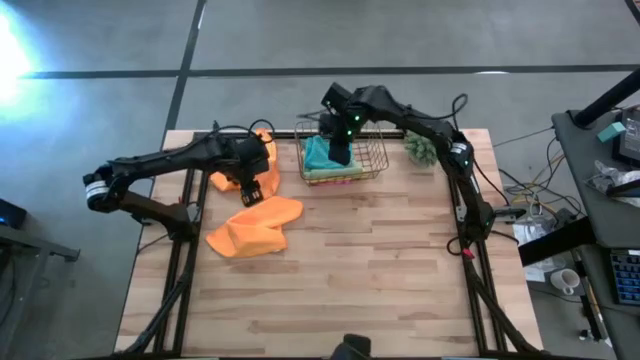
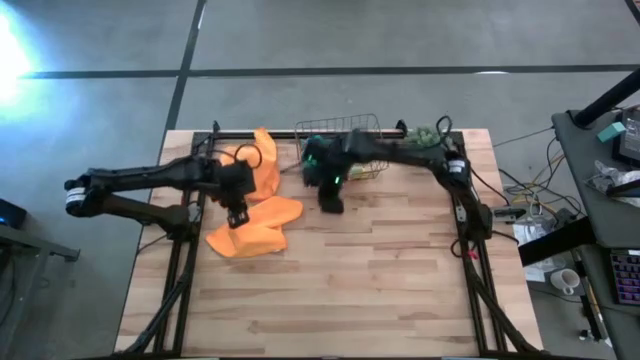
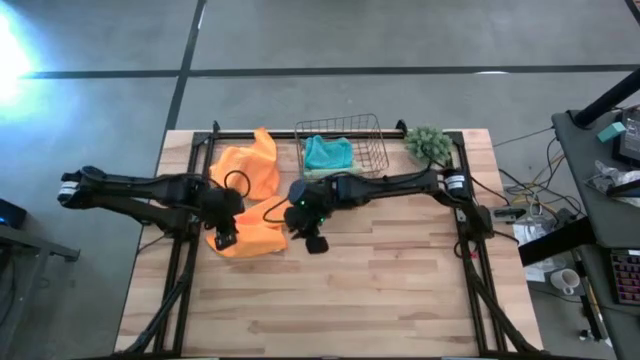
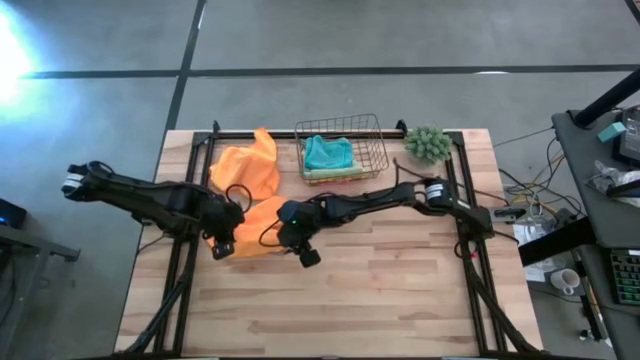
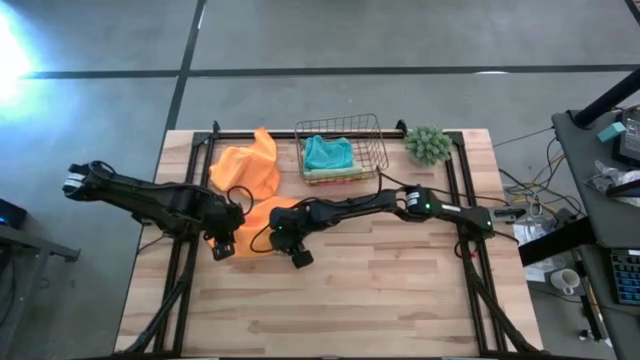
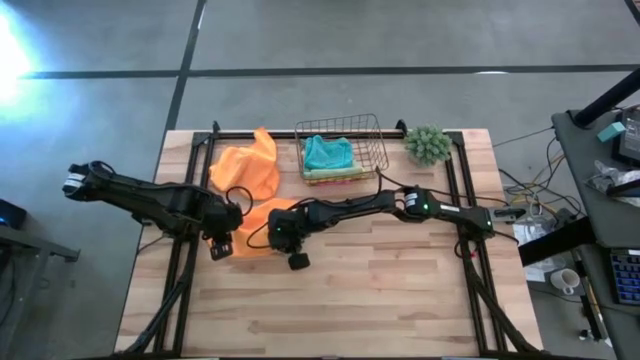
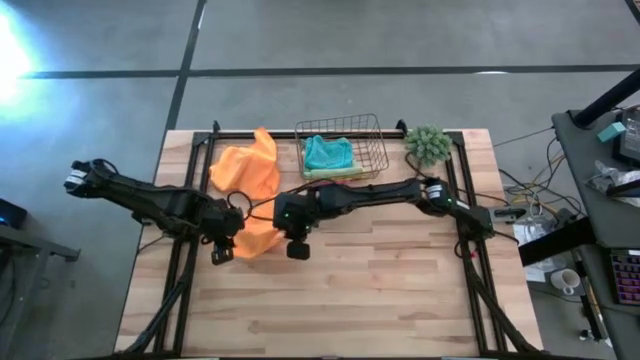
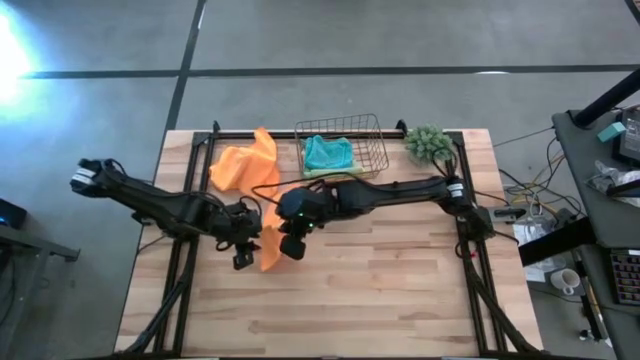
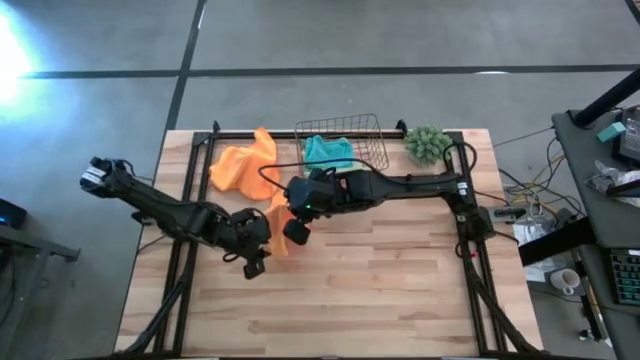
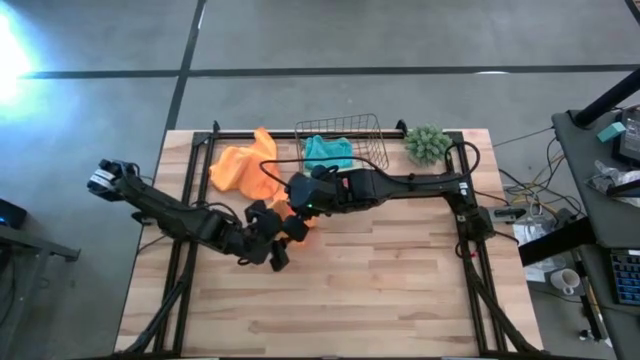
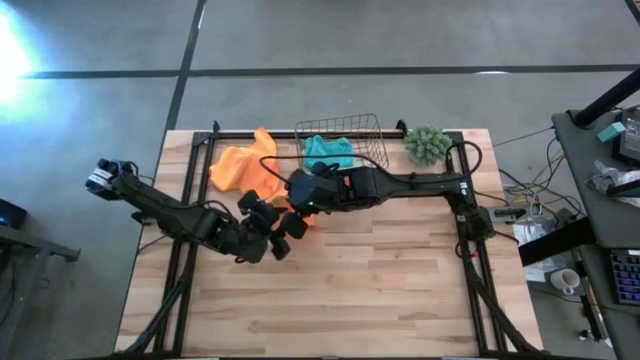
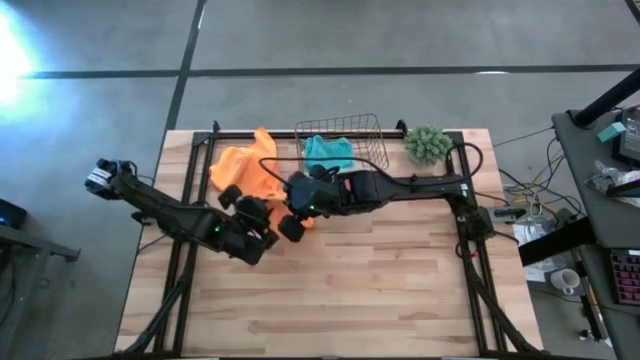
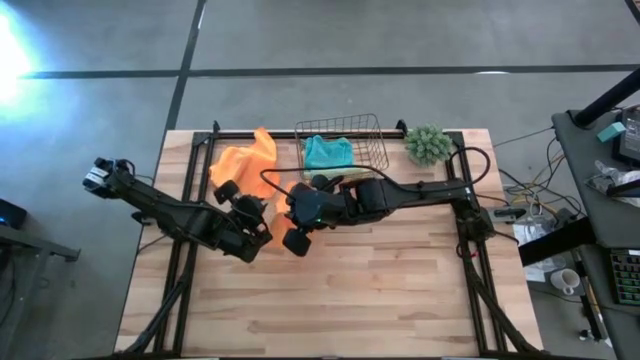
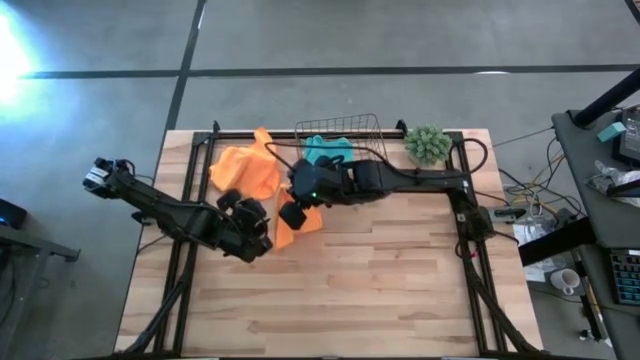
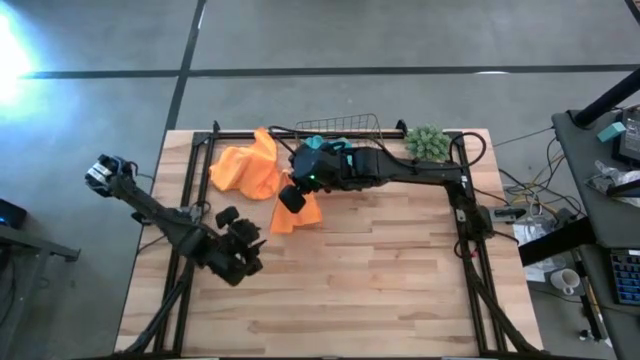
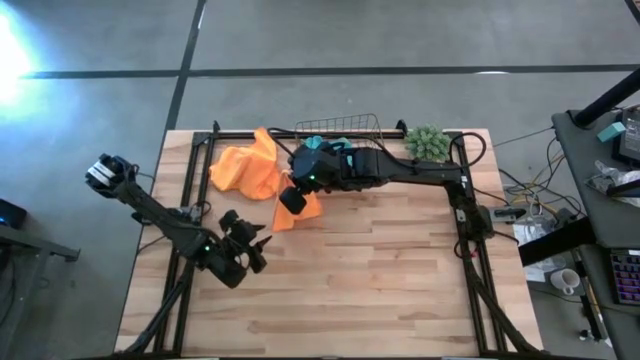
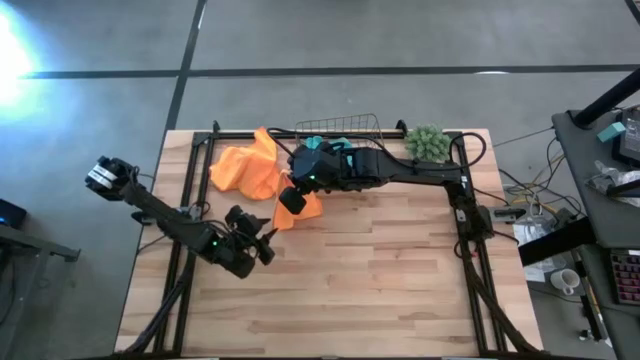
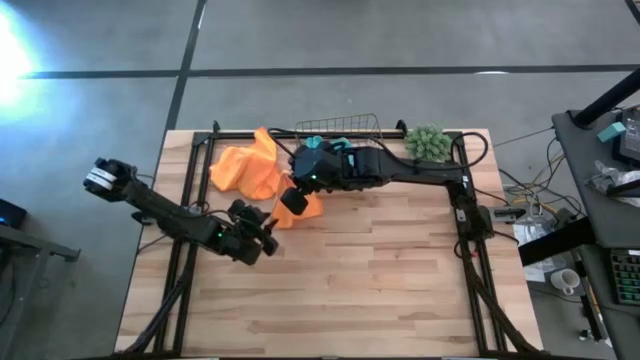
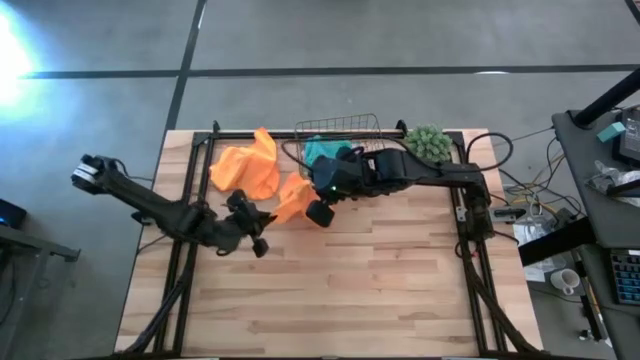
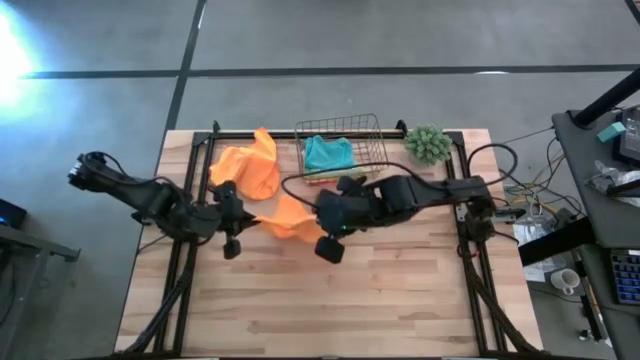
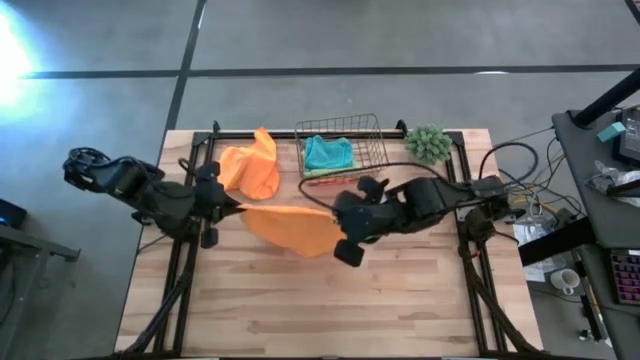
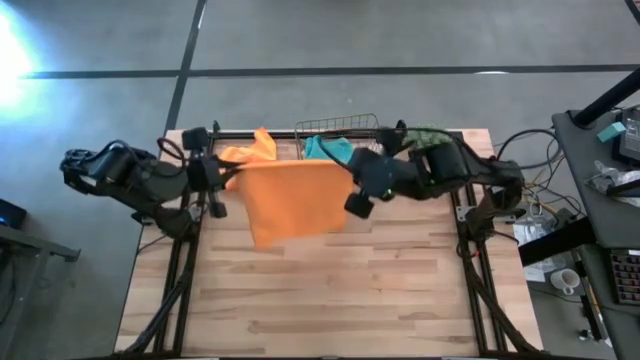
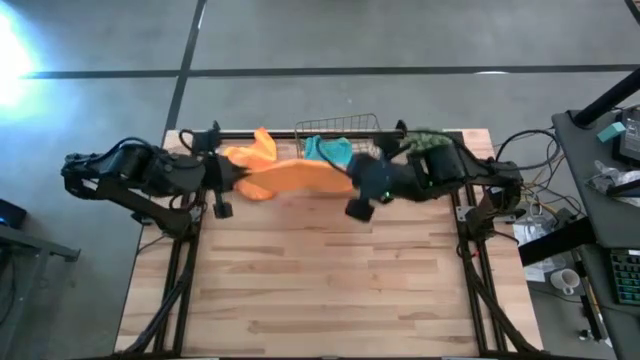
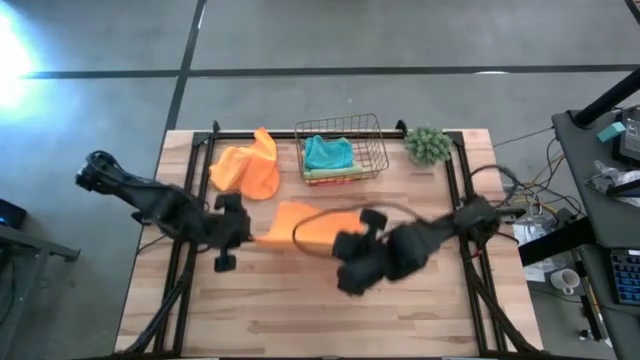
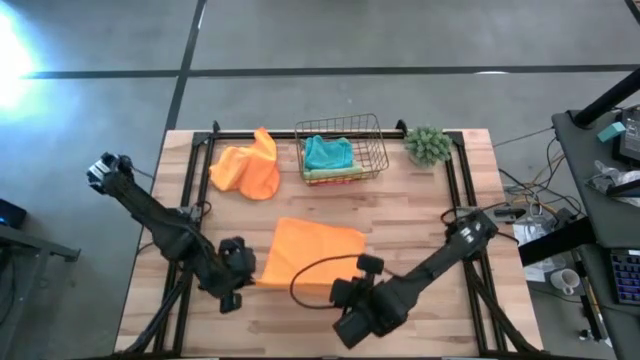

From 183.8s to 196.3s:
Task: Fold microfiber towels
Fold the bottom orange microfiber cloth

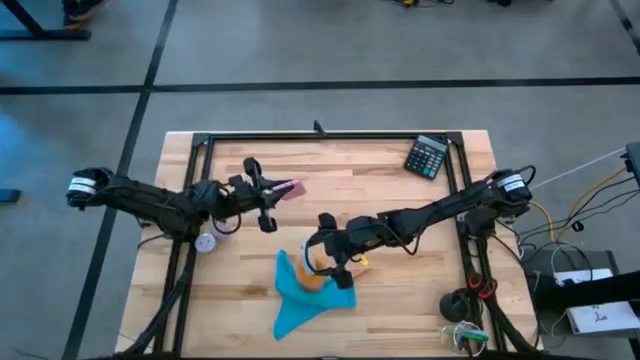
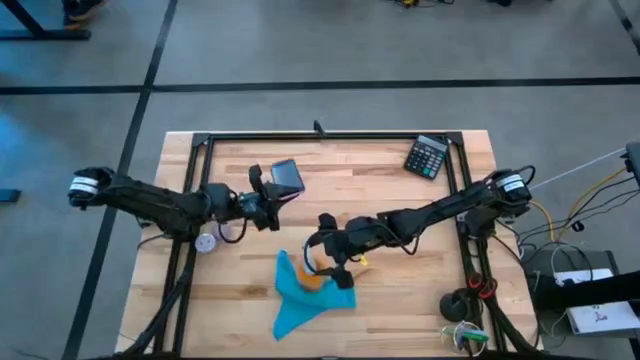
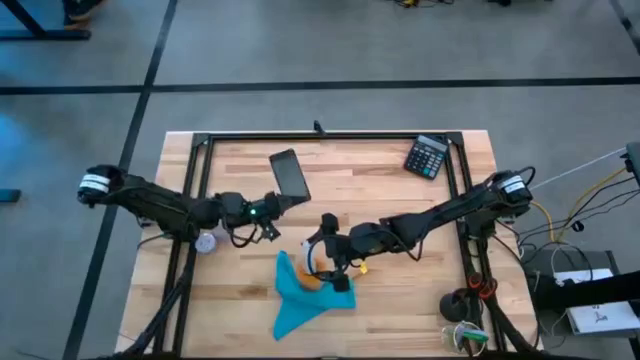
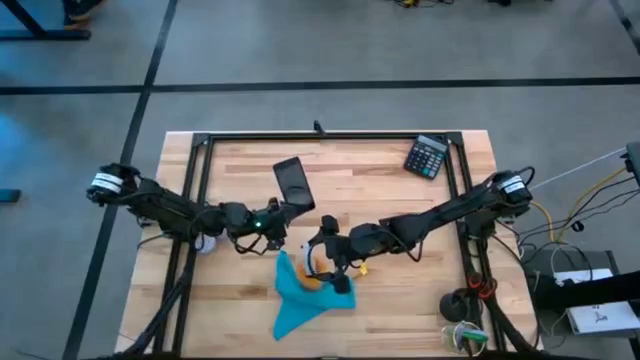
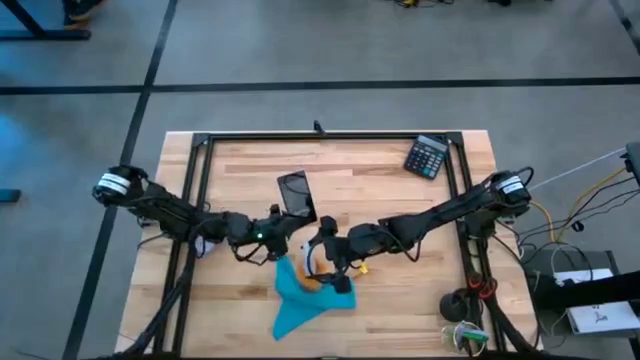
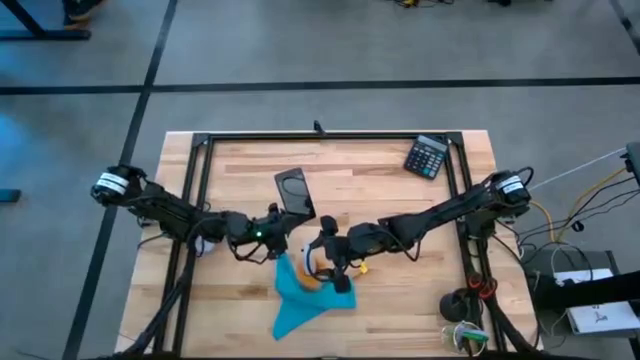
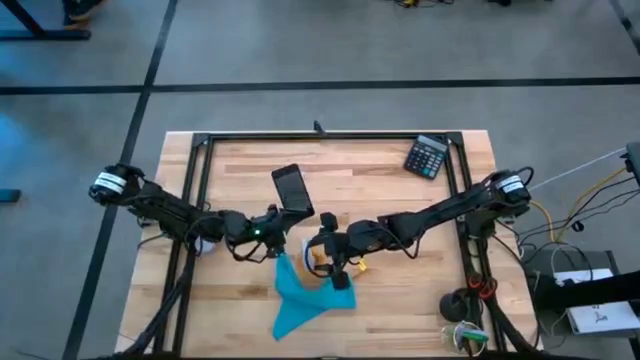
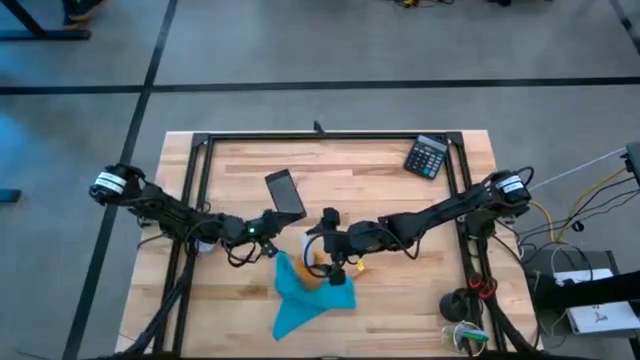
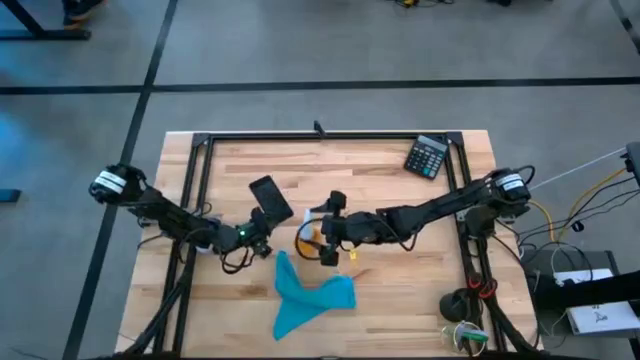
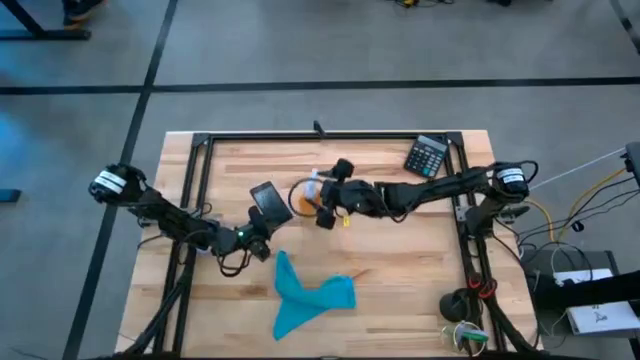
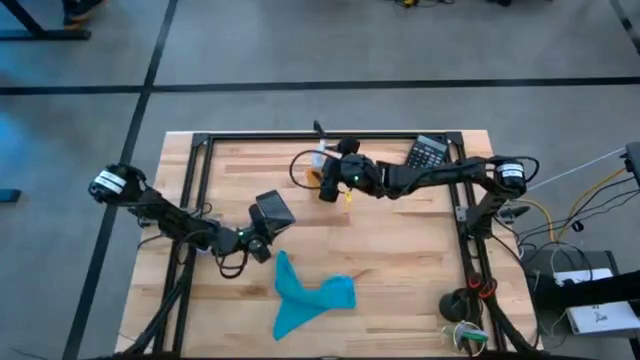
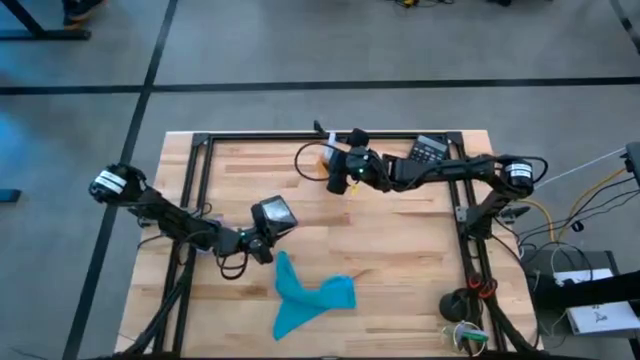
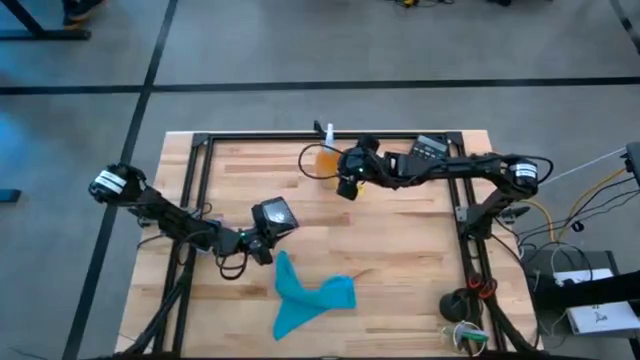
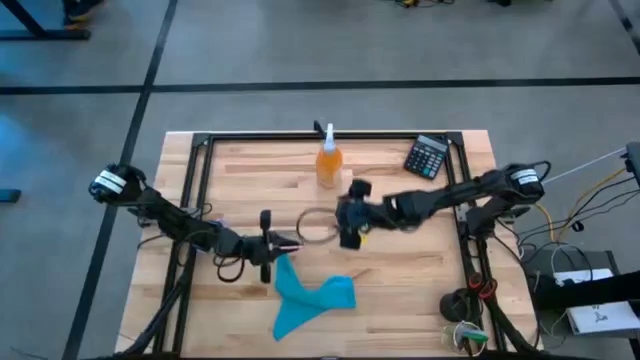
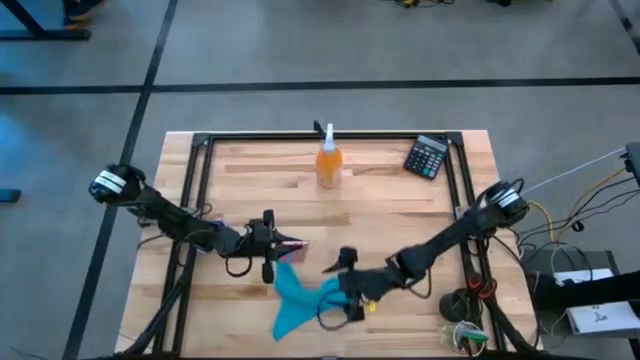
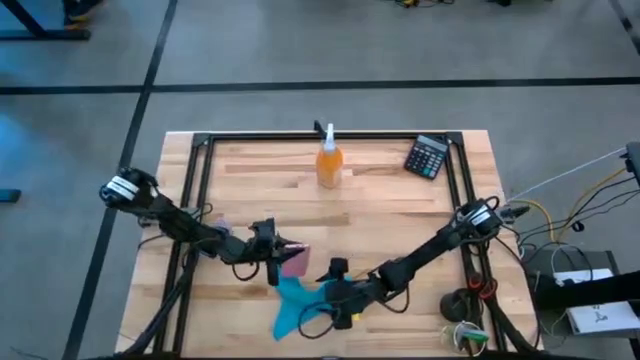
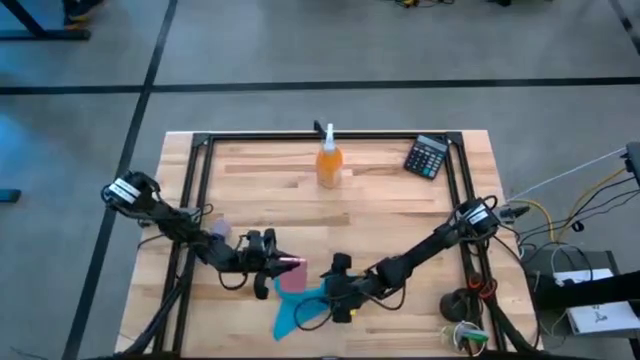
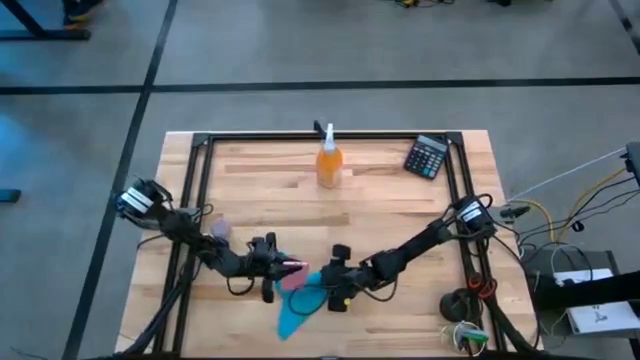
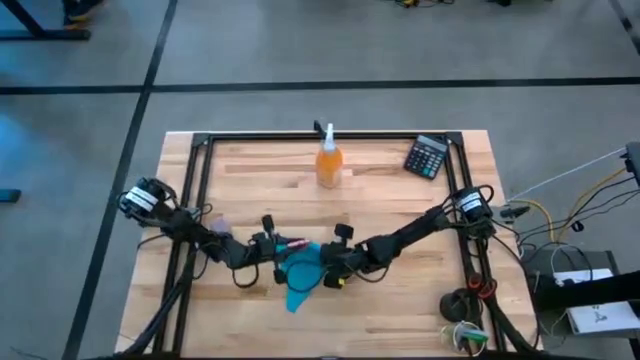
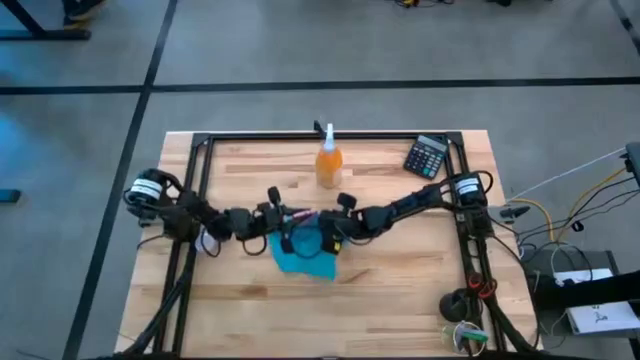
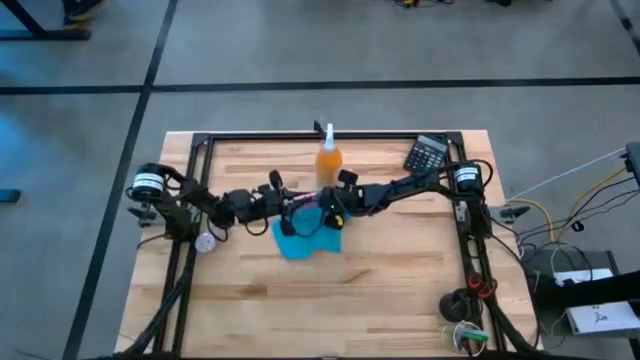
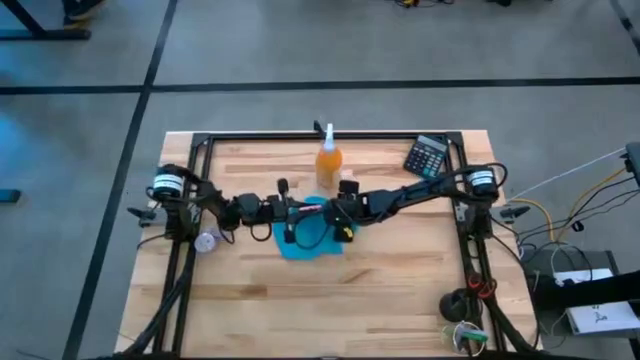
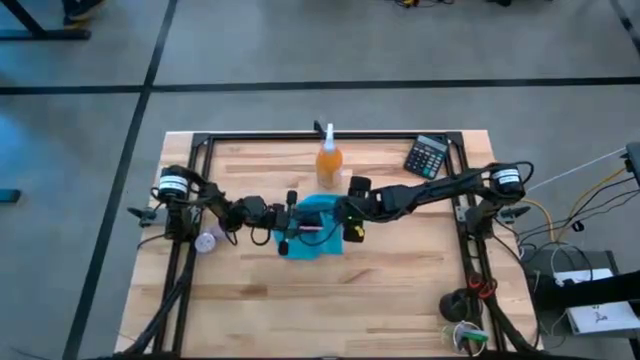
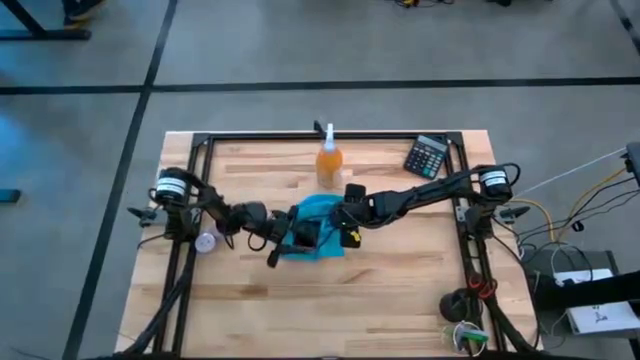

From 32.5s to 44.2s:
Task: Apply microfiber cloth
Spray the back of the pink cellphone using yellow spray bottle
